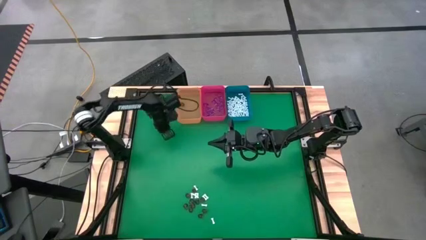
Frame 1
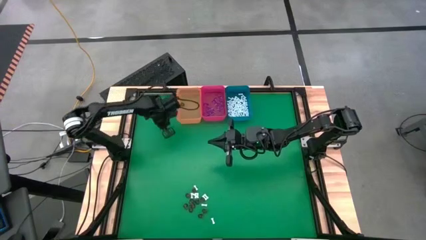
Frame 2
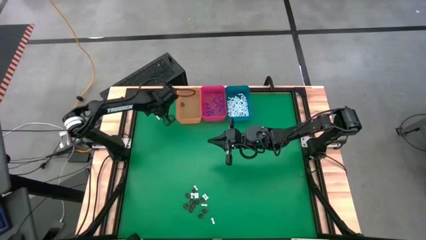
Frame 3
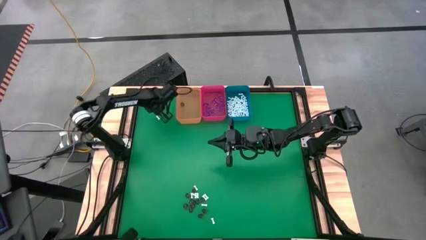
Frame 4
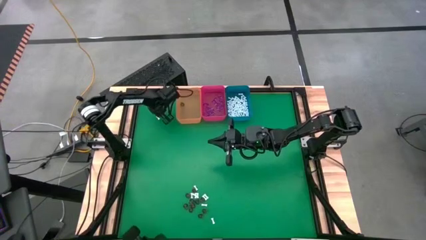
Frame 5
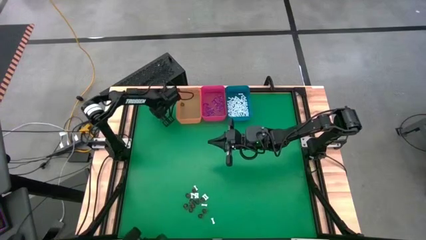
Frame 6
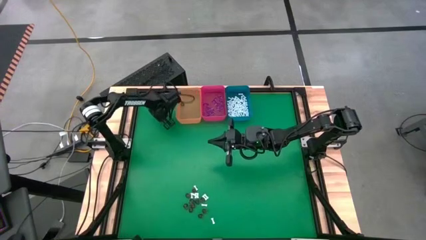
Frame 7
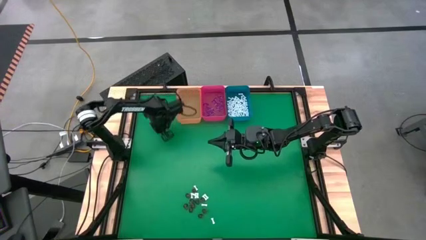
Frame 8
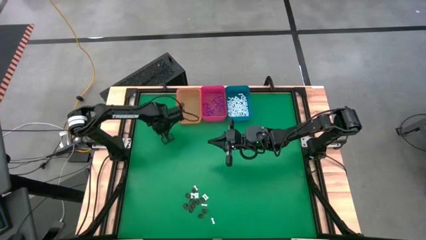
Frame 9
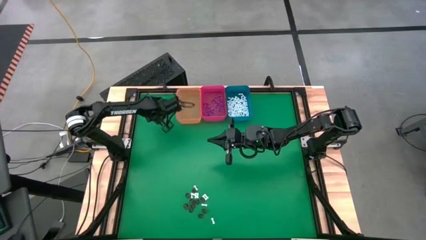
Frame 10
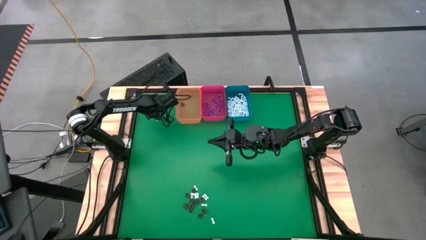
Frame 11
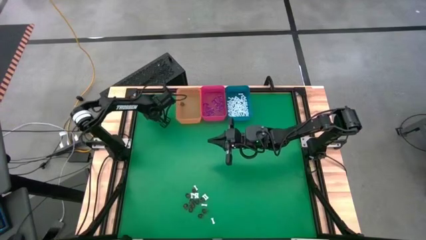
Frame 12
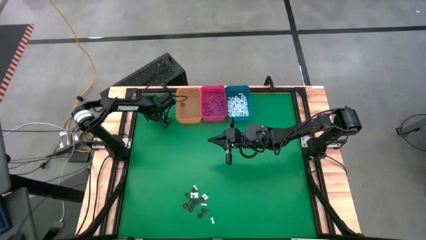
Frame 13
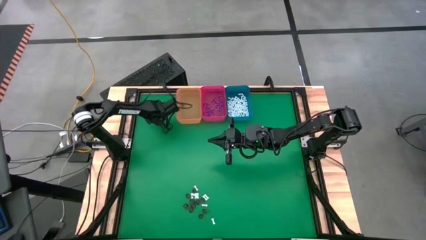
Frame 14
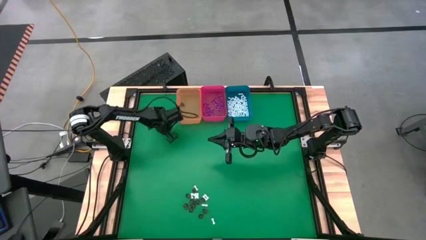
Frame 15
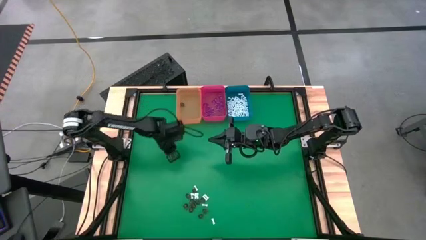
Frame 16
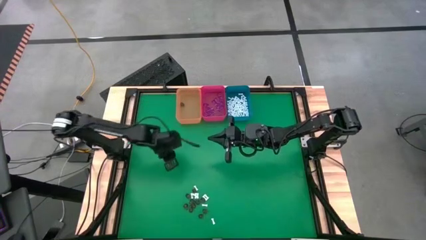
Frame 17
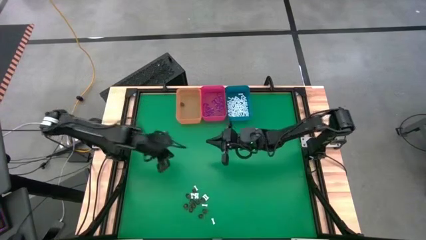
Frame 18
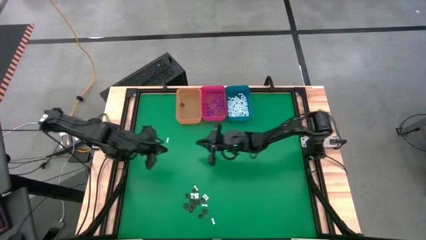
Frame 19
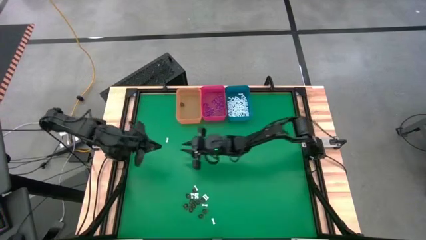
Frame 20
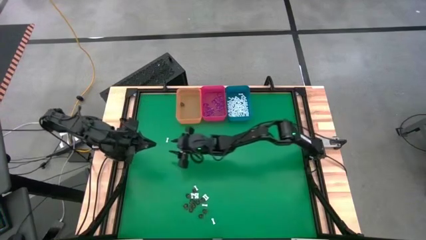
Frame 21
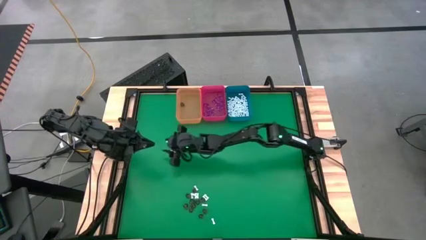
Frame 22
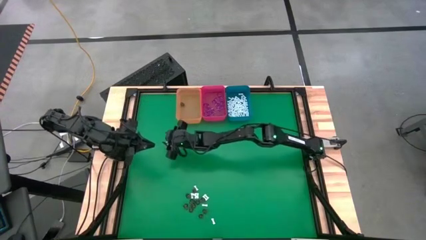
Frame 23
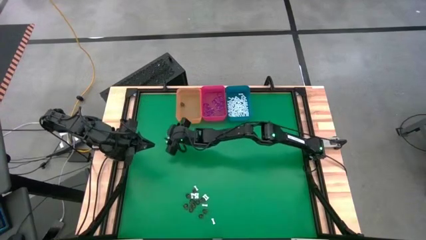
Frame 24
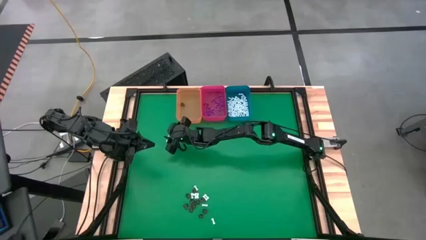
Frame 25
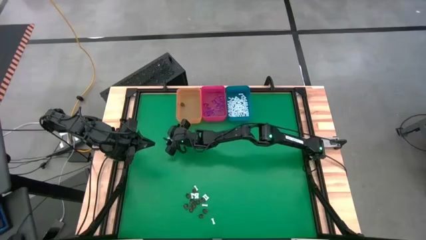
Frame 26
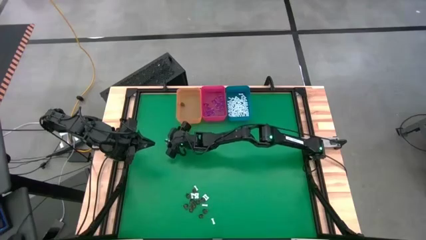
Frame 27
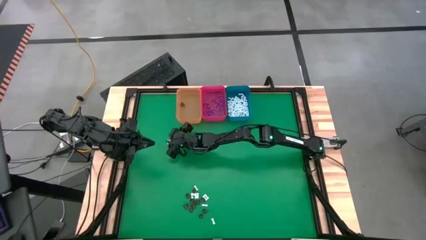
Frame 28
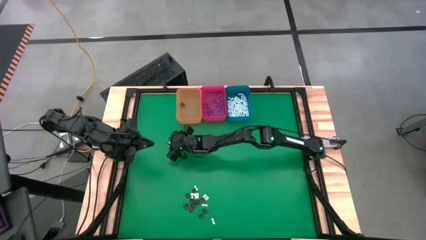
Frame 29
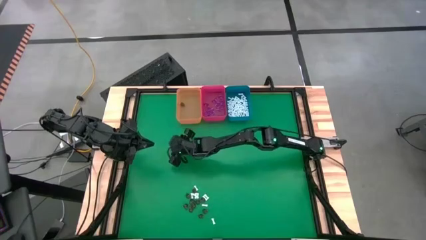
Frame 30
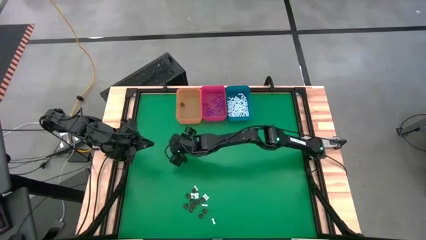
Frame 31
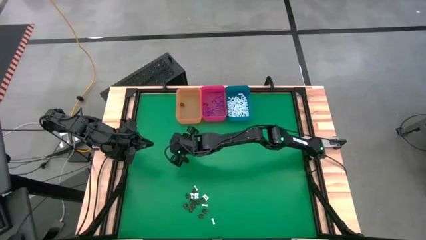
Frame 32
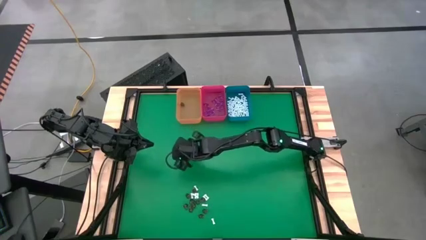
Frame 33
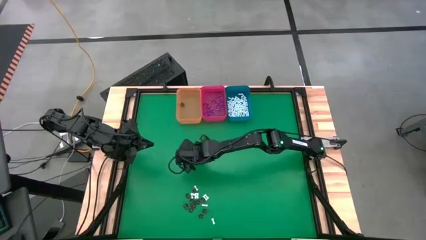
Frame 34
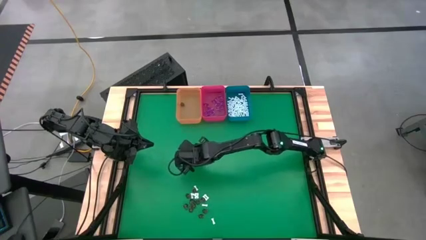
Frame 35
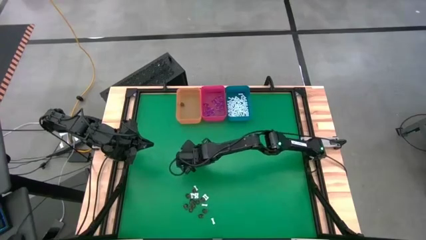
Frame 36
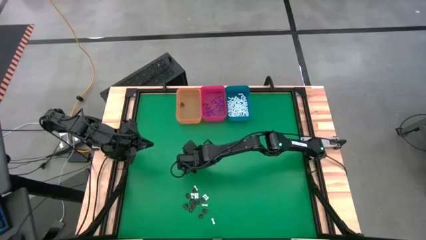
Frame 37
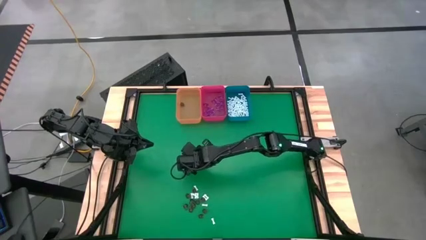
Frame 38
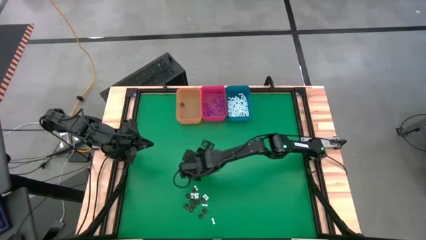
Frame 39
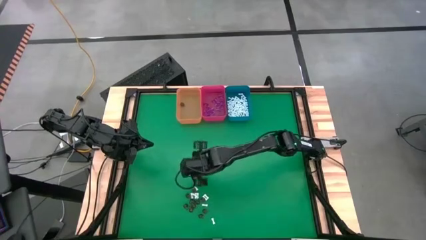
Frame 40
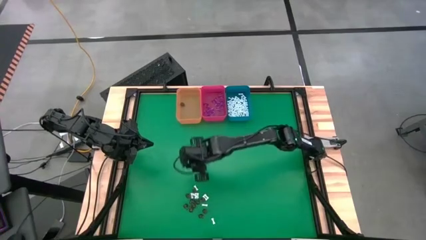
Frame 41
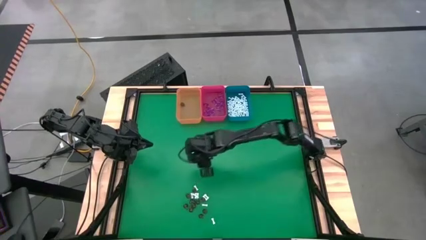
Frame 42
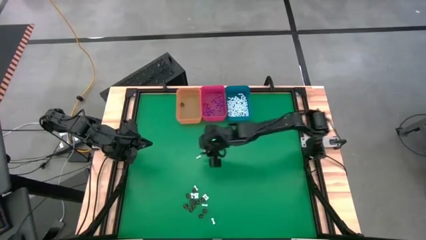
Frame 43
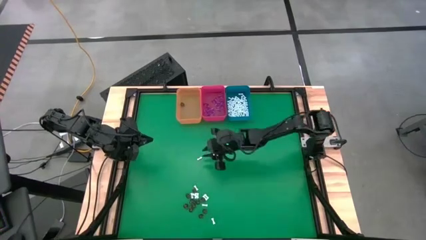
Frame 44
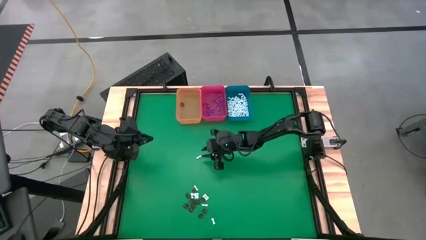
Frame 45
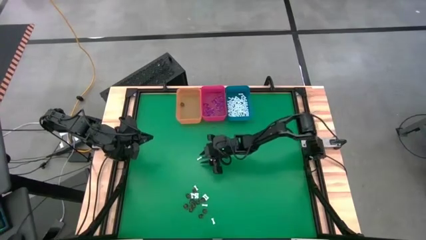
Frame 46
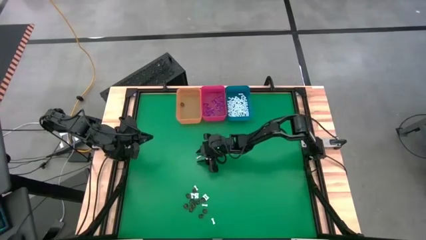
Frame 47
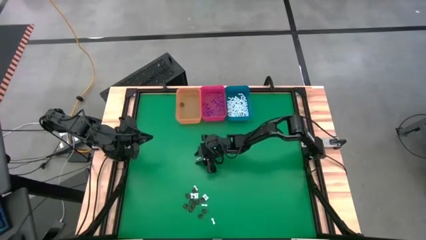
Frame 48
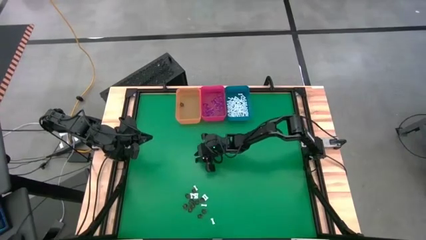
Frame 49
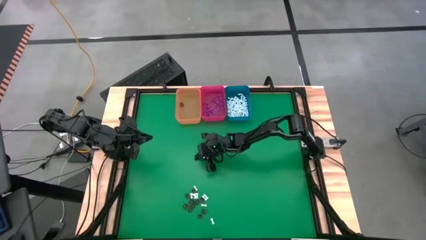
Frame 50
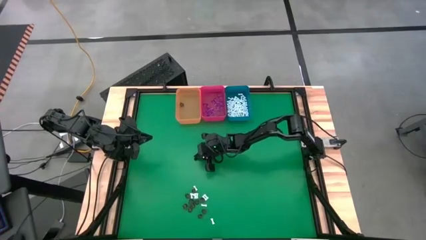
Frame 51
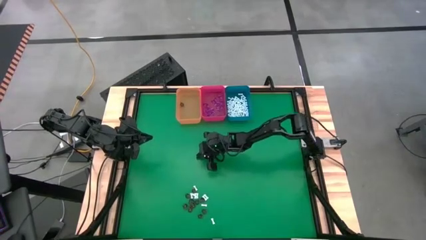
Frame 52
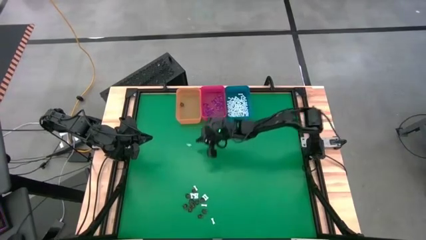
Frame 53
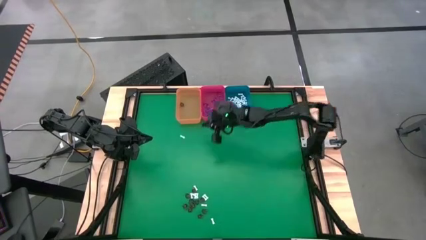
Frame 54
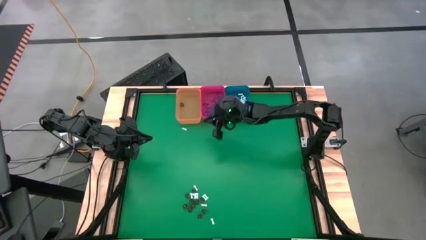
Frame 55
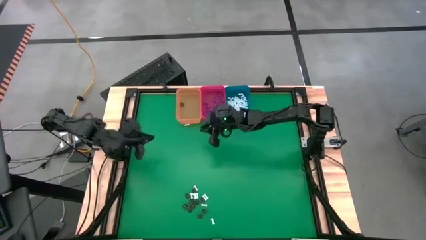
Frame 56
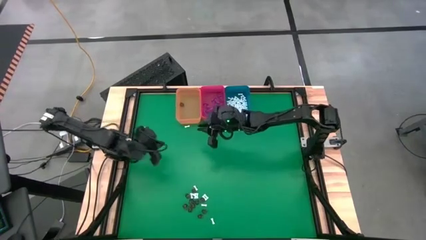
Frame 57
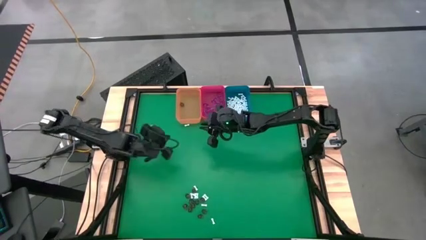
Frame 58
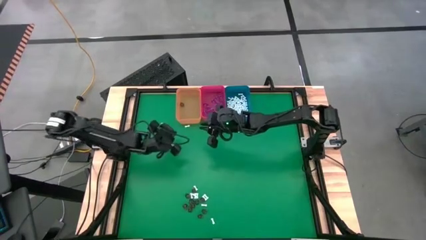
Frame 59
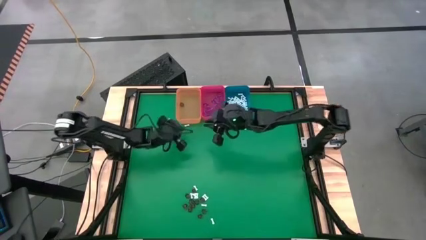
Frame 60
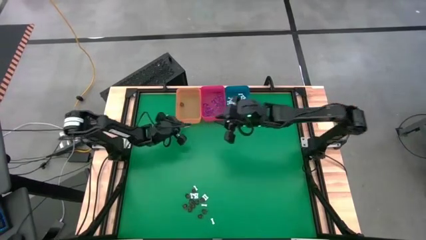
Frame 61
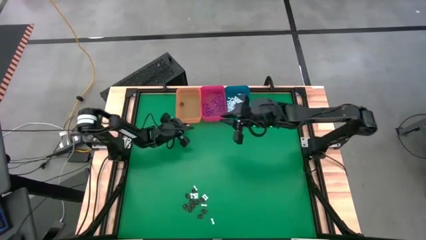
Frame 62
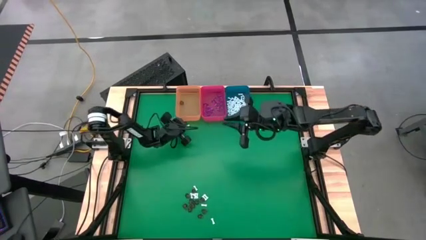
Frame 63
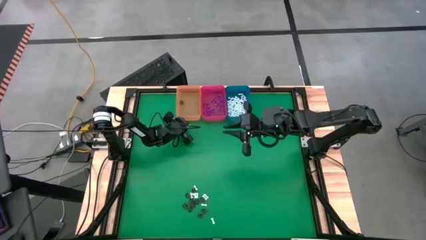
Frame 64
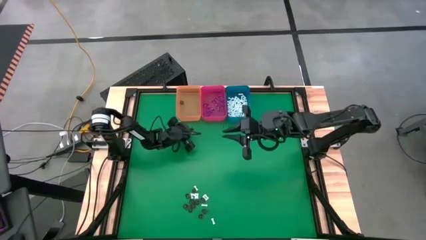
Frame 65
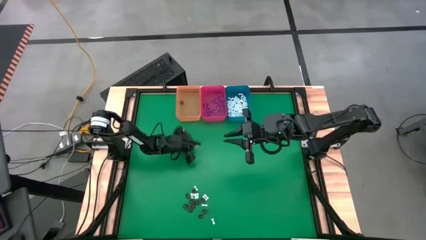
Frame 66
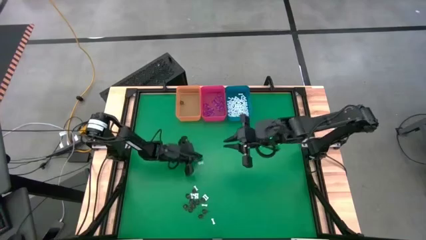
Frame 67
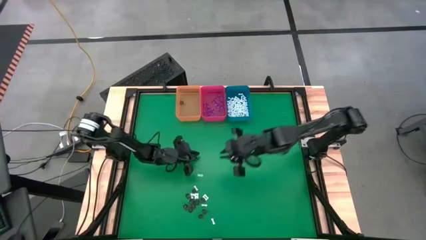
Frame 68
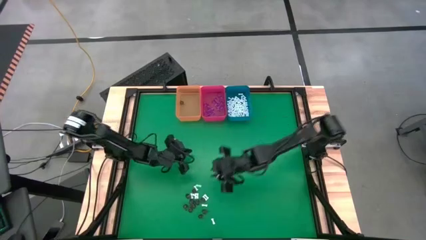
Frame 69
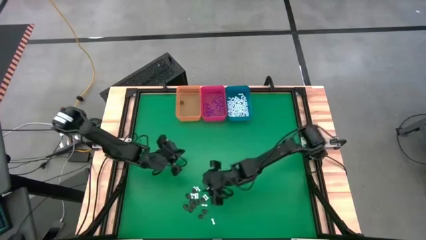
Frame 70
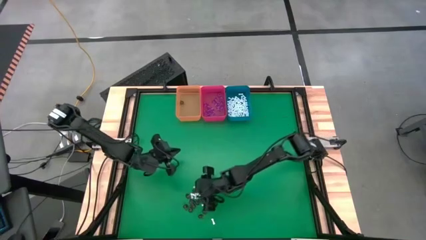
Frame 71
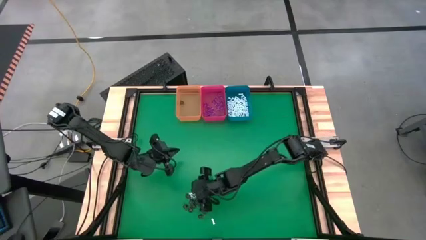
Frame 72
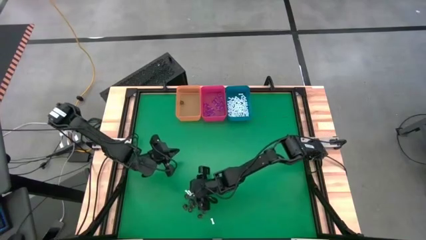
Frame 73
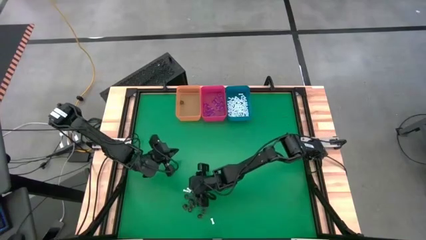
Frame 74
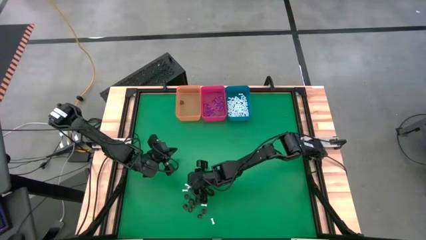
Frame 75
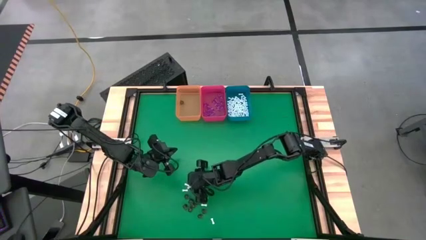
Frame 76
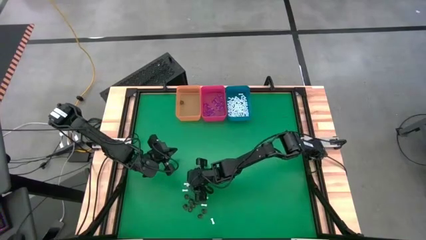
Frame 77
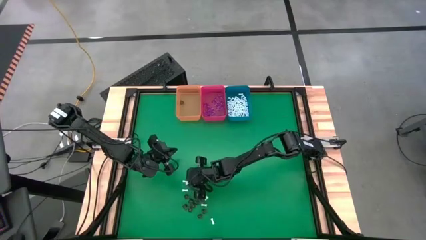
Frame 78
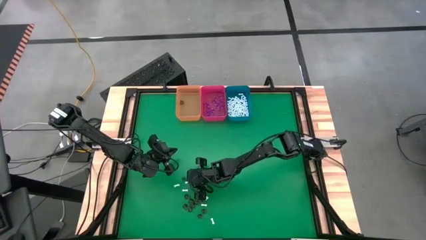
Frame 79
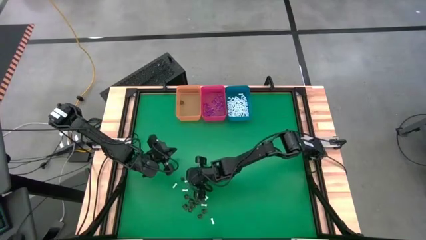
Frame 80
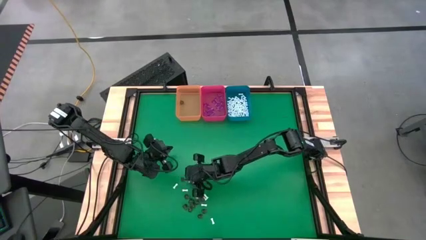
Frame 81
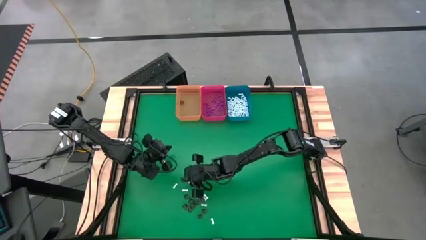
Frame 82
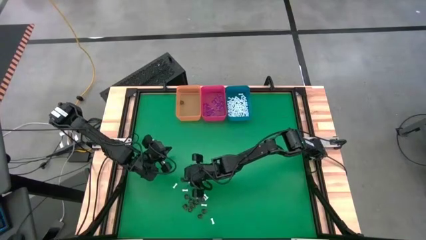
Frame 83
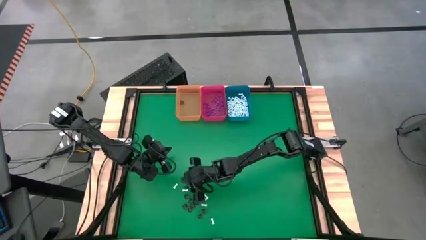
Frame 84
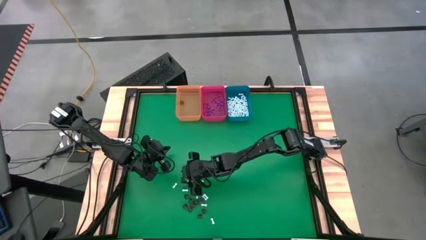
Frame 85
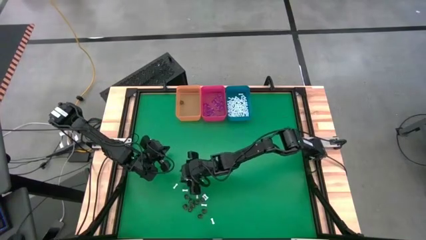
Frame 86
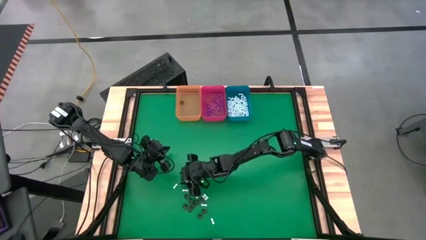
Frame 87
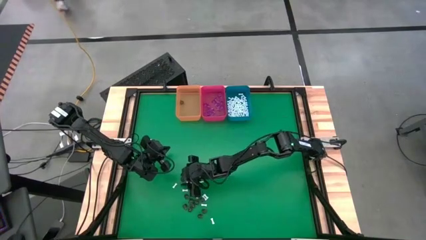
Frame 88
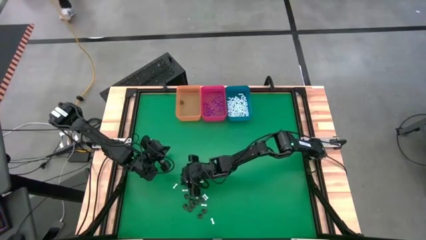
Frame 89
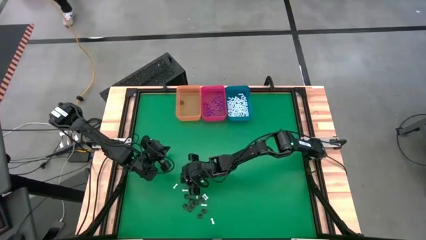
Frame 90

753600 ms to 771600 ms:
Task: Sort Halloween decoration
Put the white bone toy into the blue bin
